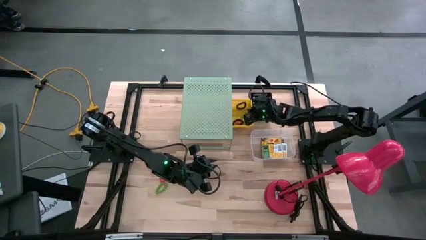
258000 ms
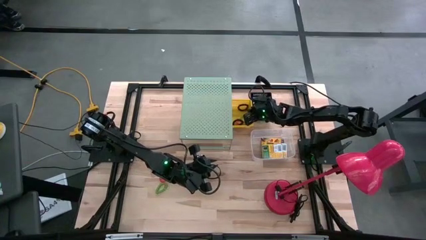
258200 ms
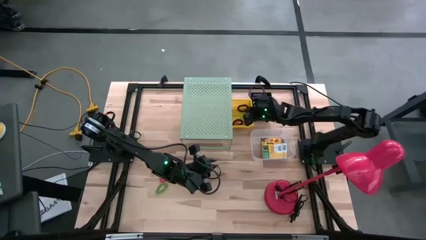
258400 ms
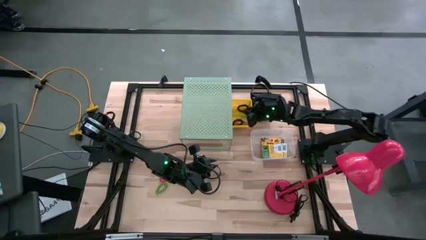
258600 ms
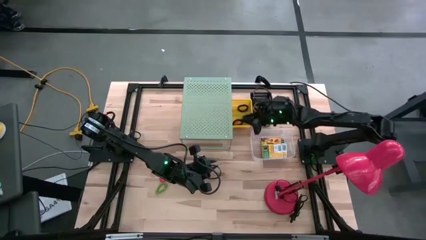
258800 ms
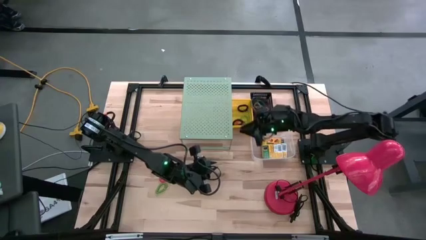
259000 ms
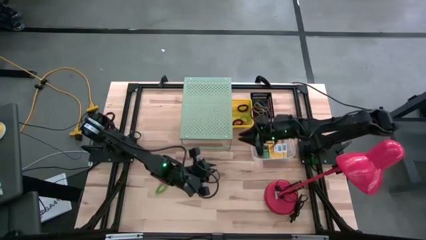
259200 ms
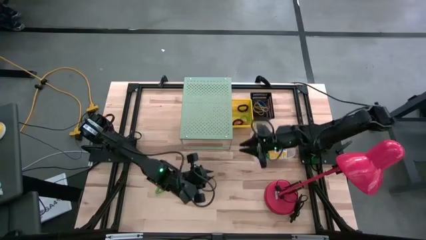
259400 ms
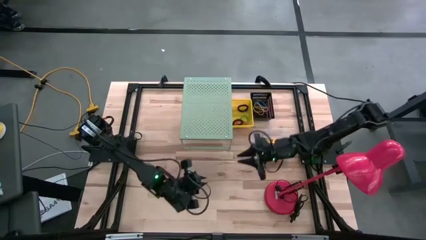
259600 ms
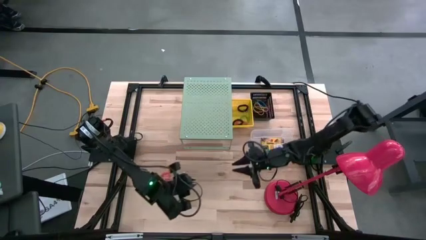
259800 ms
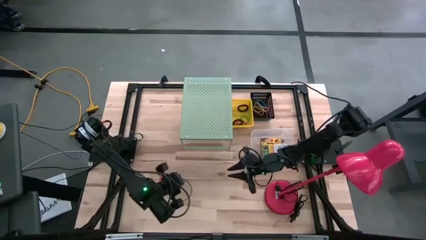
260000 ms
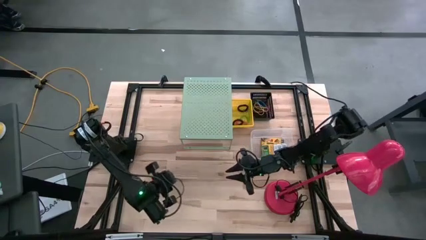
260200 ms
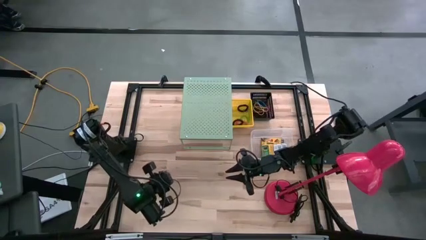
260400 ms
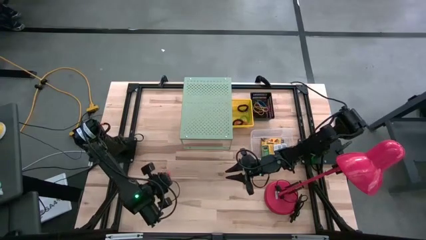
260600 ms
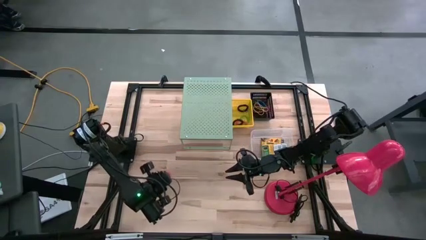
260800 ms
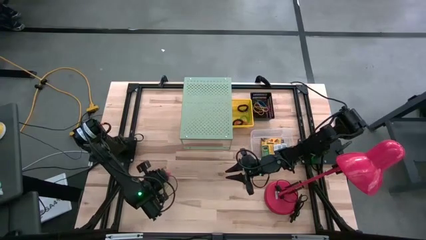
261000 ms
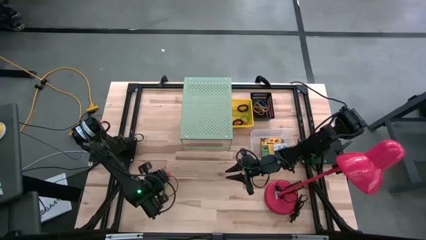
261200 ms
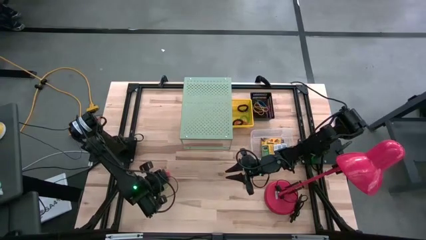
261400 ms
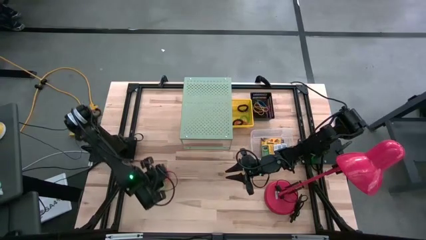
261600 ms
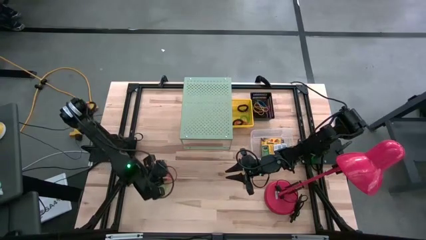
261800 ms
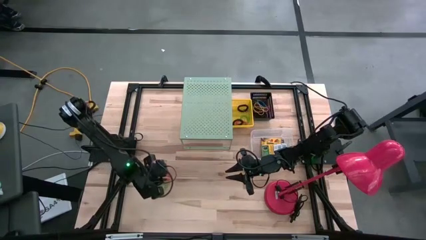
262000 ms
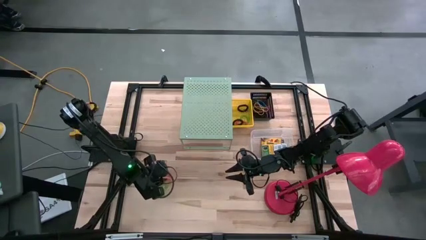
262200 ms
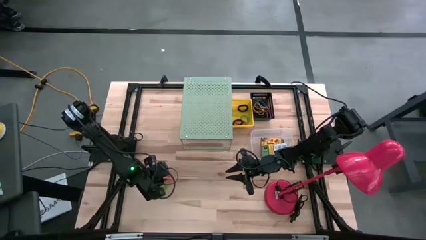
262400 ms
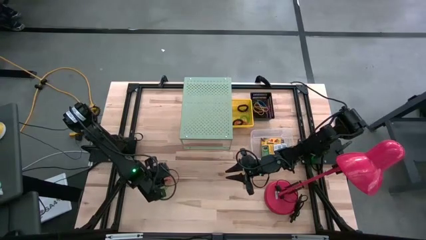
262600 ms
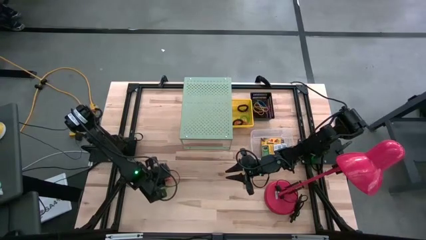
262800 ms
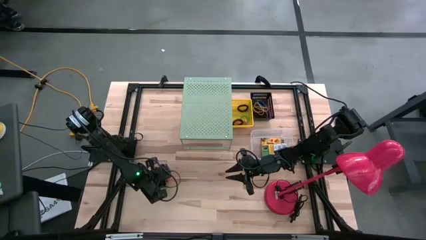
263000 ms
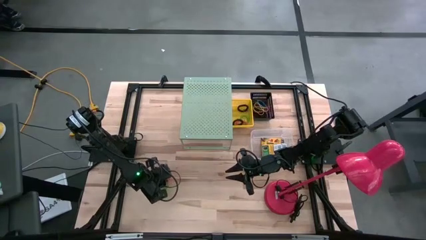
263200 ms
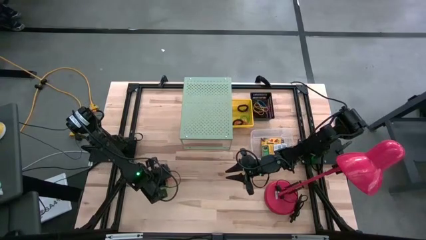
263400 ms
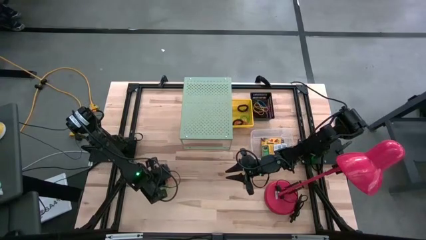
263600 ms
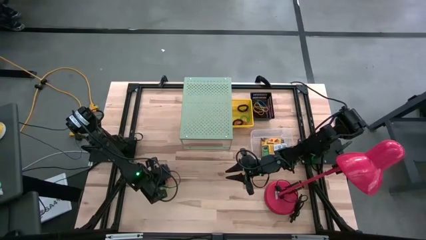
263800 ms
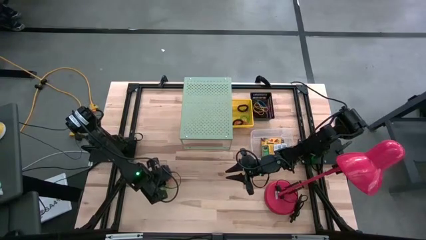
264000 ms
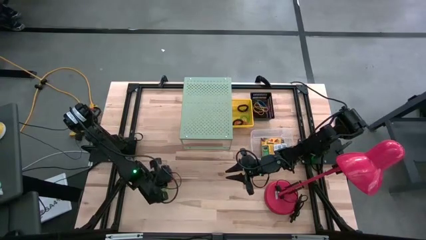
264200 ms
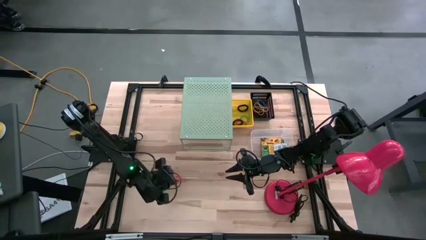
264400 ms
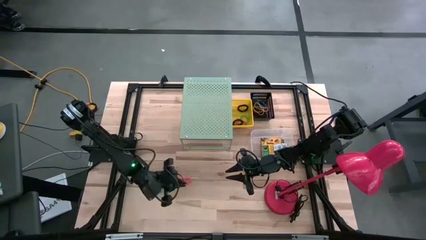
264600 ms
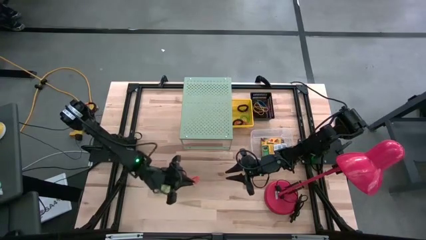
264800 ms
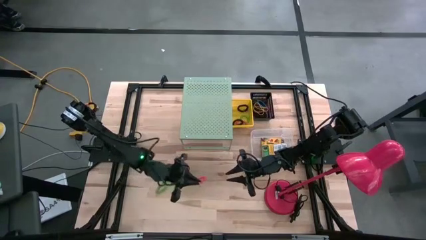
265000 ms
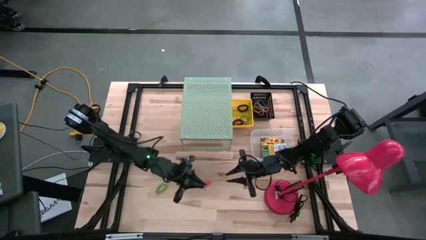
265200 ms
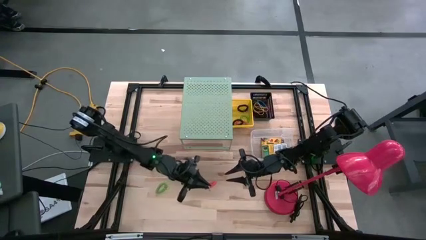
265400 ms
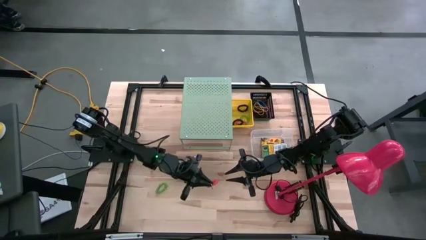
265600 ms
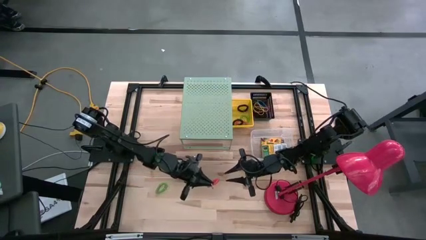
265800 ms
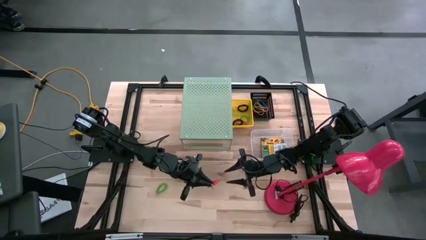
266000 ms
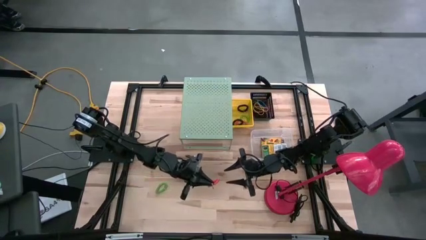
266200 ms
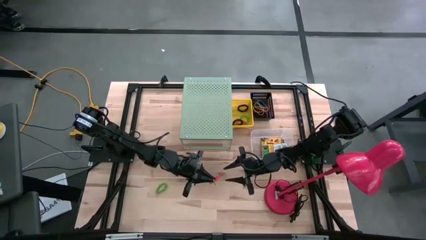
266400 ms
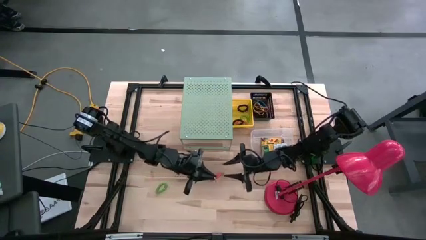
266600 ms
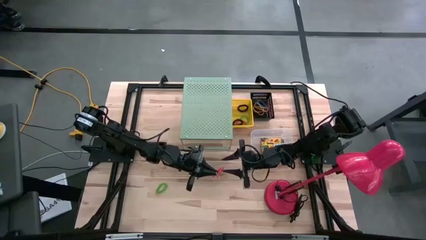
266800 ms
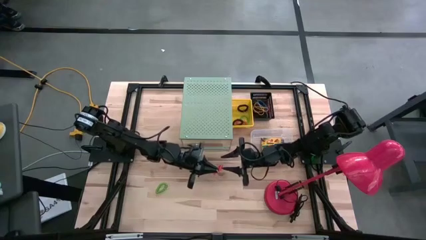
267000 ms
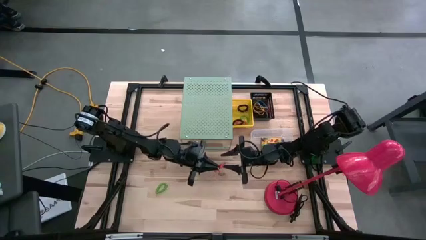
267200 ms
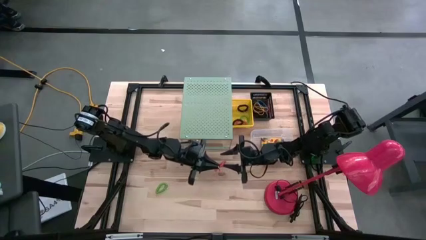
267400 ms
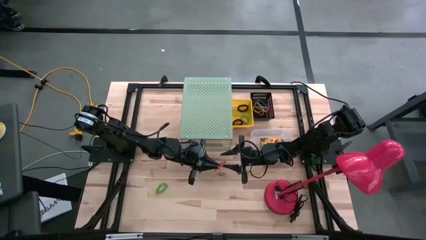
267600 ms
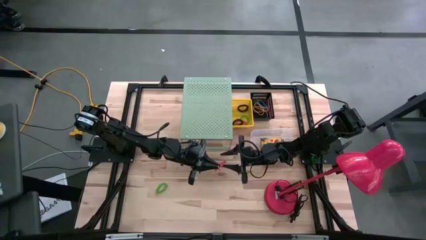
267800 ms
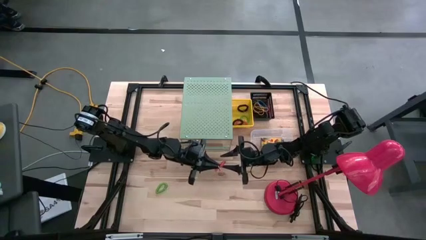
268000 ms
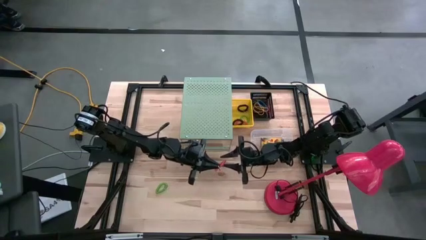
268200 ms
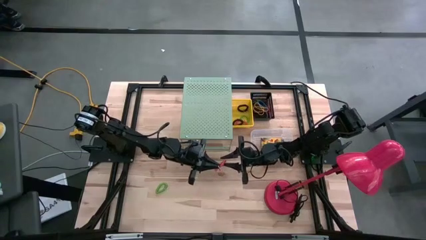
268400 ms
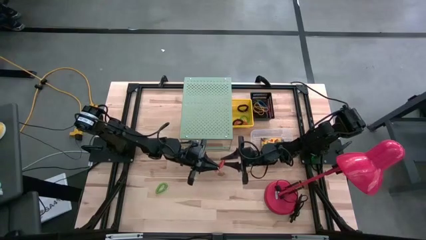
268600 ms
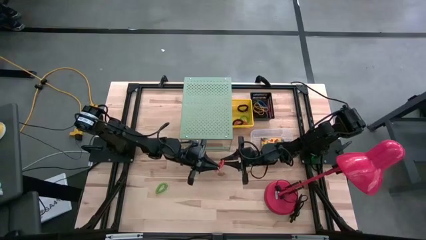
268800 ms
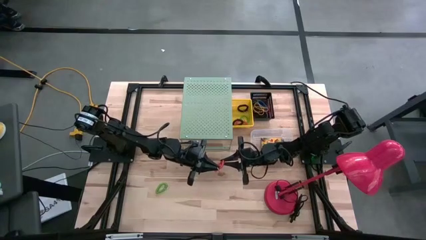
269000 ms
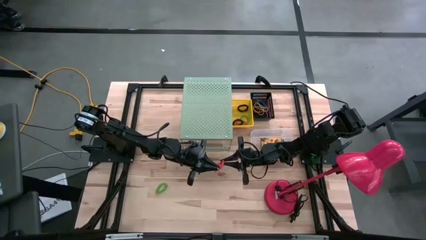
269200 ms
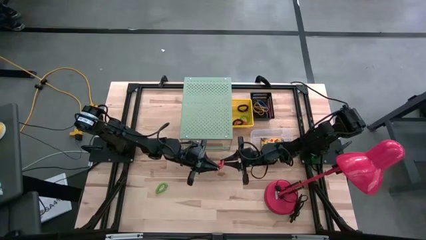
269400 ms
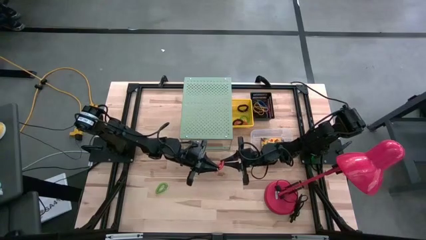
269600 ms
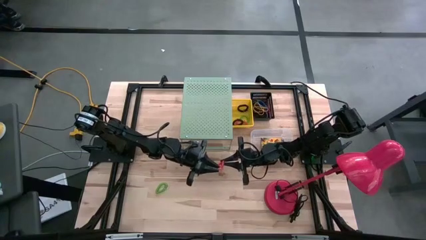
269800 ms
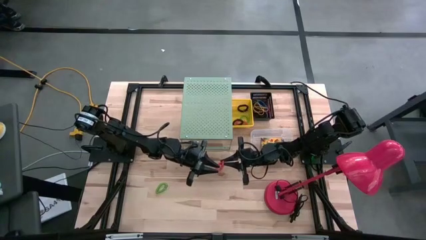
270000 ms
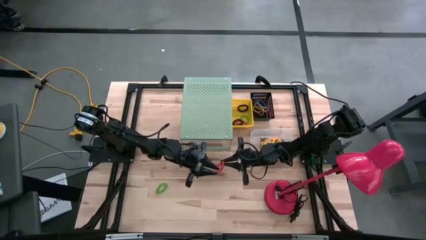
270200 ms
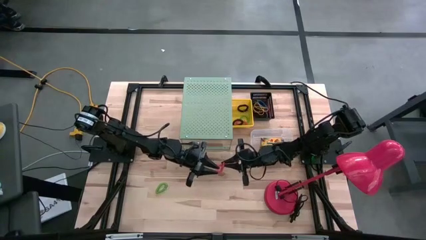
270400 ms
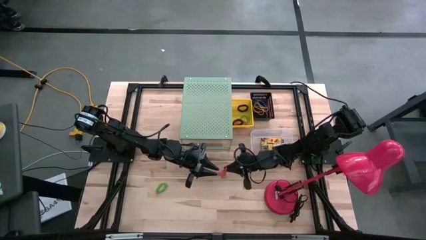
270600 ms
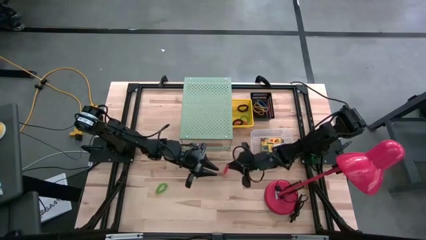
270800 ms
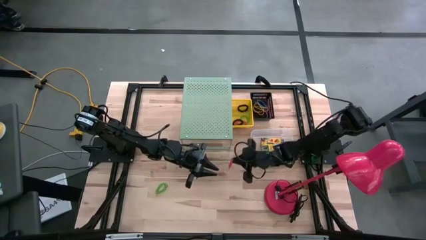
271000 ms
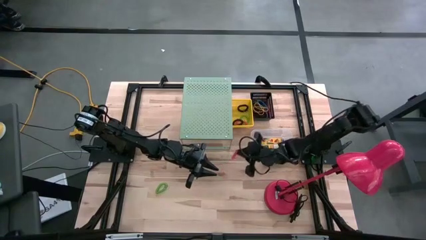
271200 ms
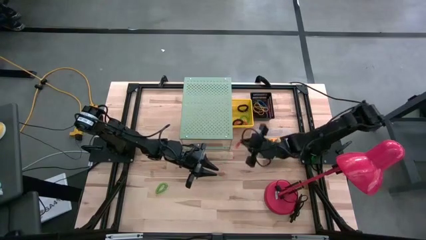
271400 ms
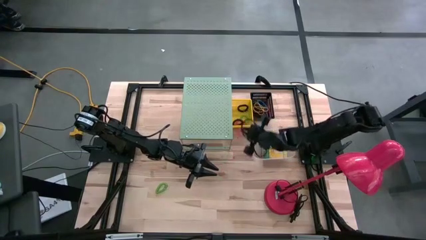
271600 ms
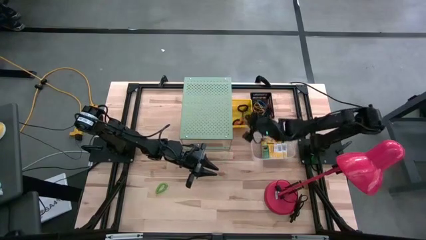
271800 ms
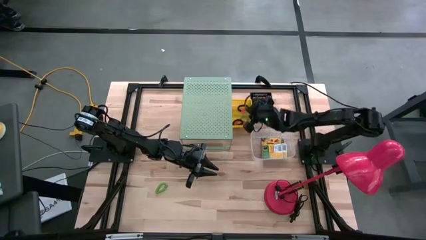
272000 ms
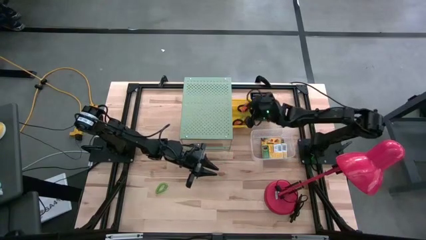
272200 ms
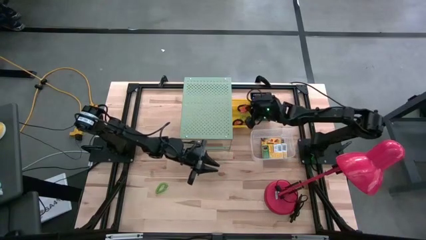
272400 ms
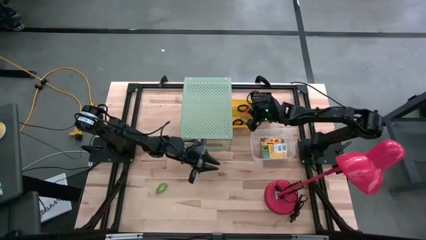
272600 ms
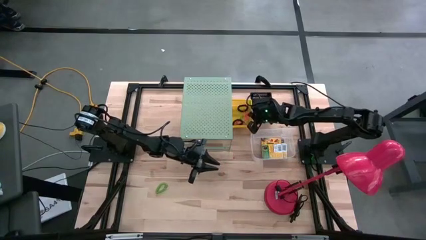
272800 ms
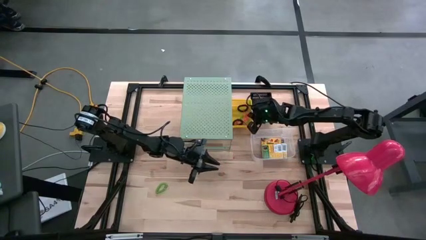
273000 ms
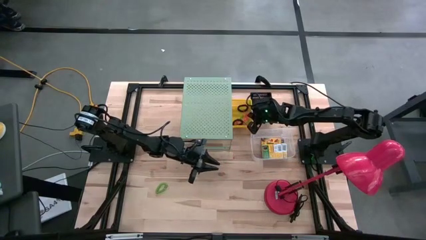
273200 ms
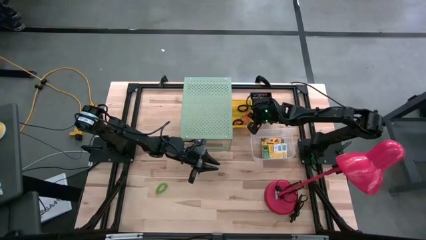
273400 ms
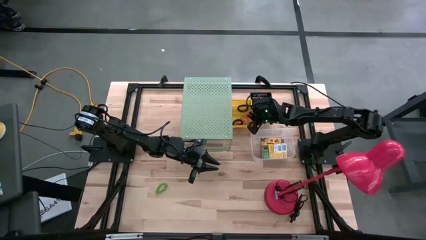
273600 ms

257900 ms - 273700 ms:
Task: Pick & Place Office Desk Supplies
Put the orange spring keychain into the yellow bin
